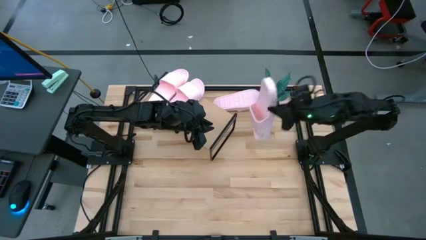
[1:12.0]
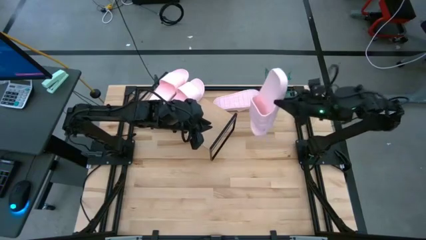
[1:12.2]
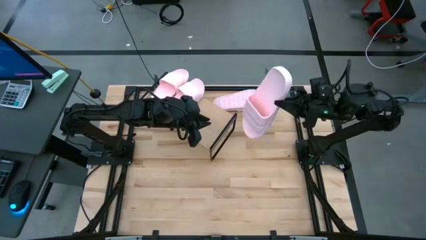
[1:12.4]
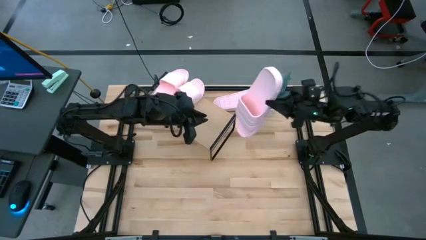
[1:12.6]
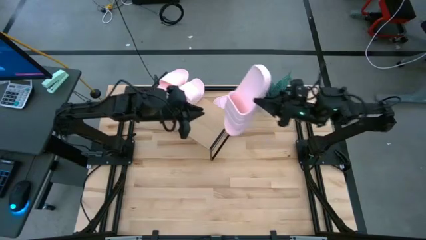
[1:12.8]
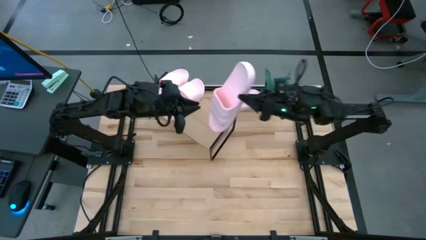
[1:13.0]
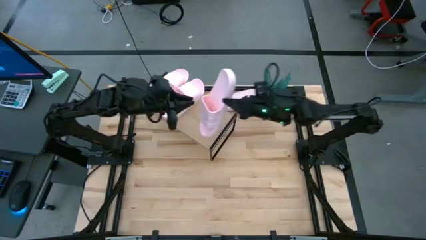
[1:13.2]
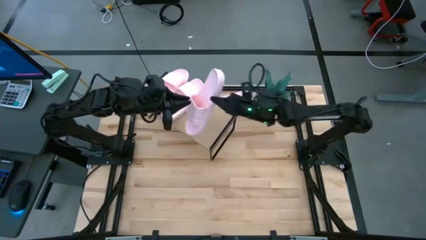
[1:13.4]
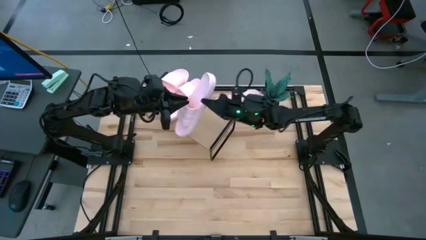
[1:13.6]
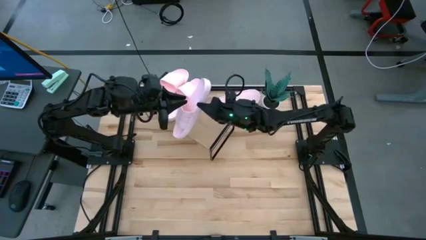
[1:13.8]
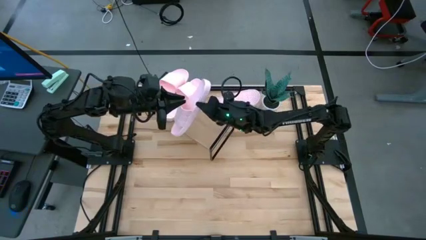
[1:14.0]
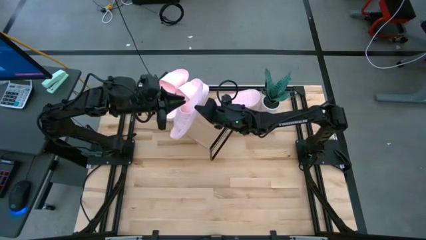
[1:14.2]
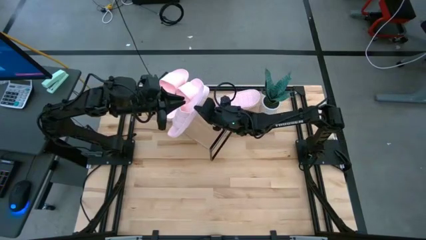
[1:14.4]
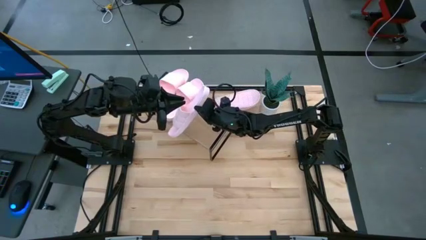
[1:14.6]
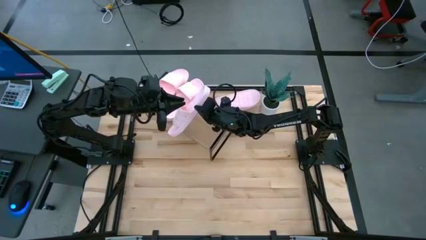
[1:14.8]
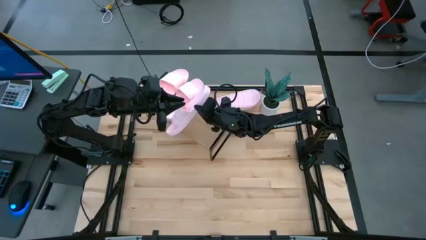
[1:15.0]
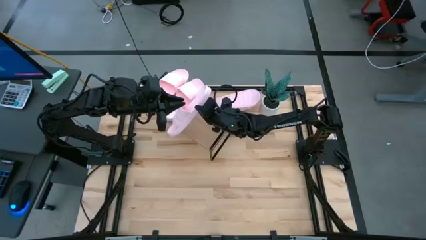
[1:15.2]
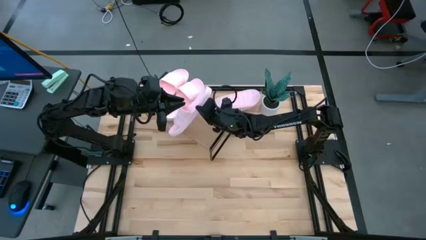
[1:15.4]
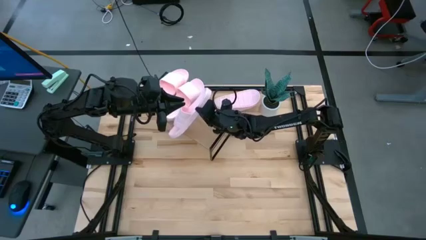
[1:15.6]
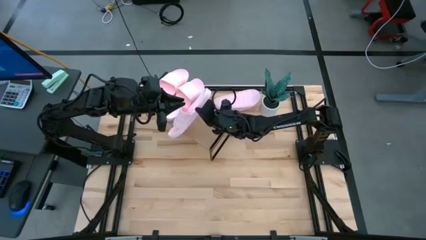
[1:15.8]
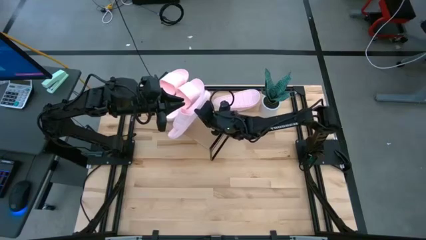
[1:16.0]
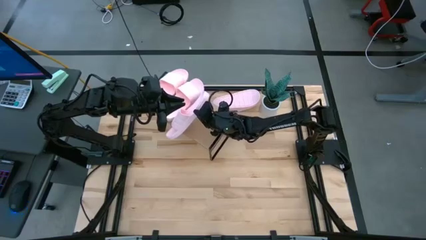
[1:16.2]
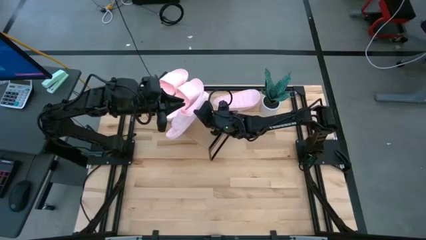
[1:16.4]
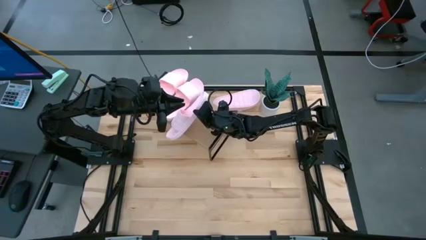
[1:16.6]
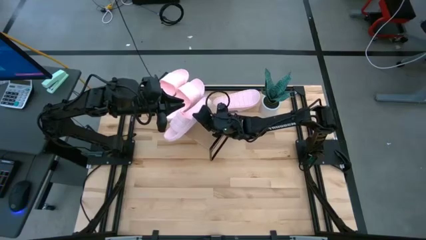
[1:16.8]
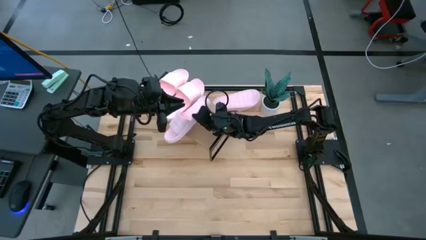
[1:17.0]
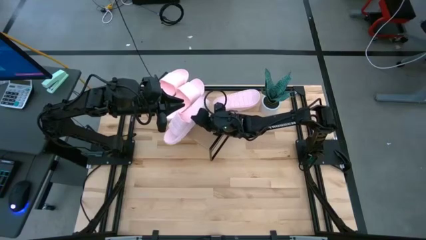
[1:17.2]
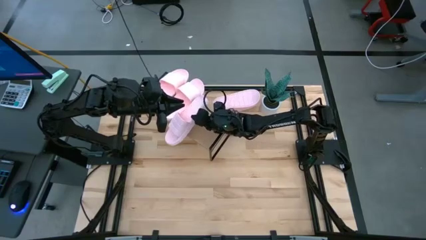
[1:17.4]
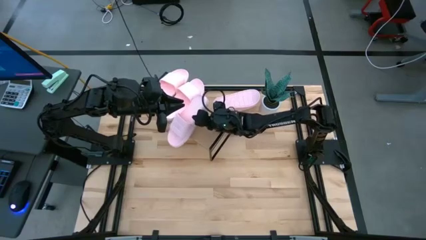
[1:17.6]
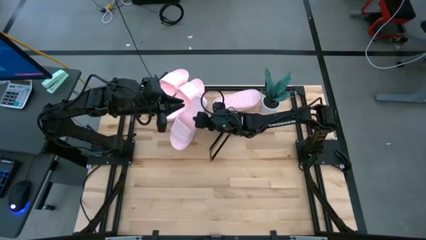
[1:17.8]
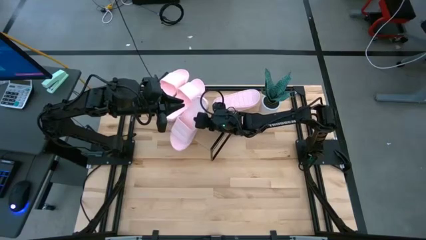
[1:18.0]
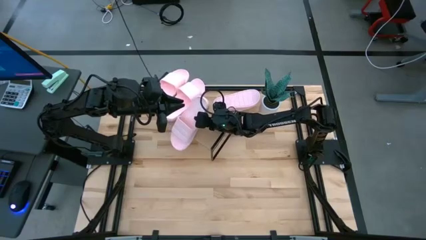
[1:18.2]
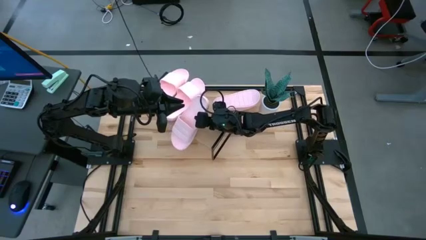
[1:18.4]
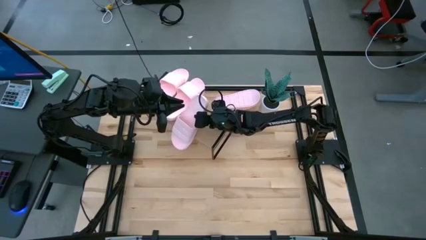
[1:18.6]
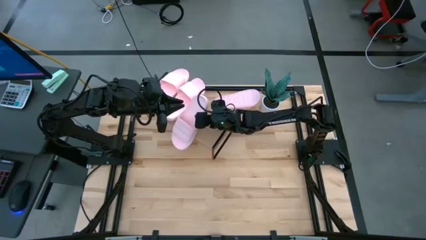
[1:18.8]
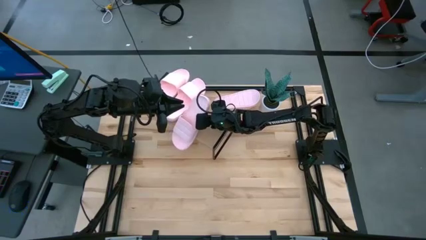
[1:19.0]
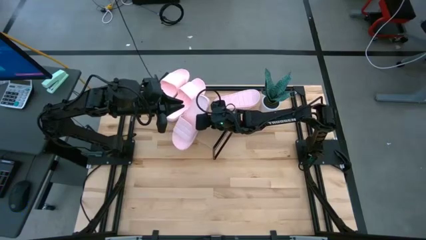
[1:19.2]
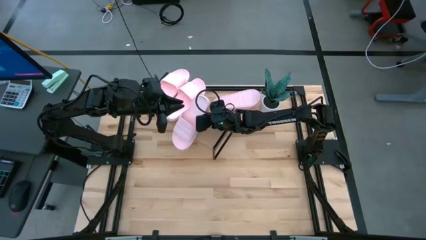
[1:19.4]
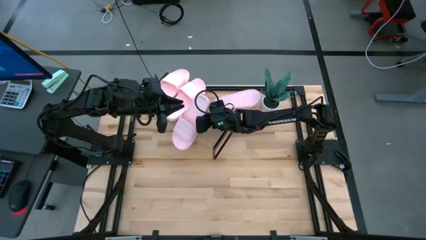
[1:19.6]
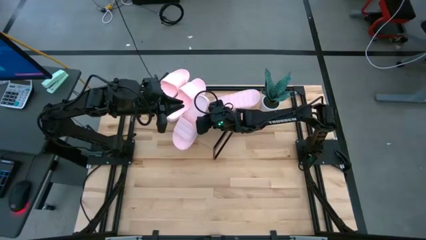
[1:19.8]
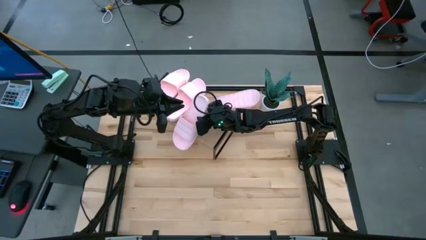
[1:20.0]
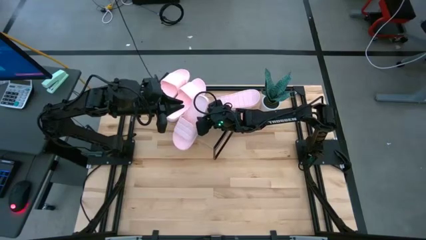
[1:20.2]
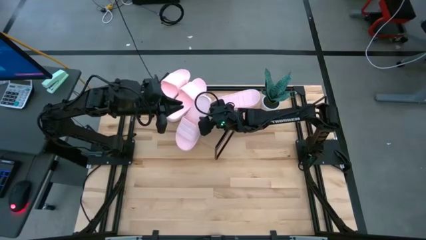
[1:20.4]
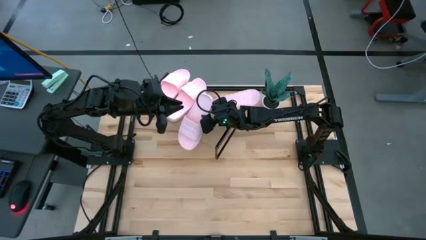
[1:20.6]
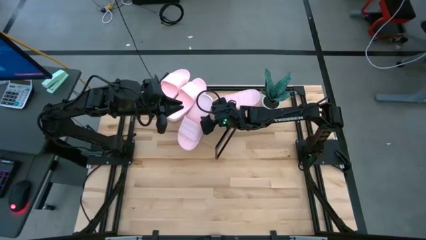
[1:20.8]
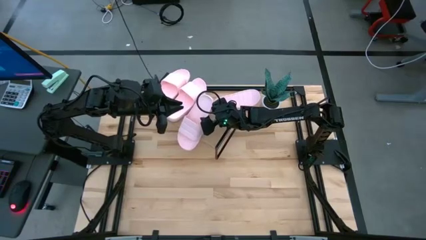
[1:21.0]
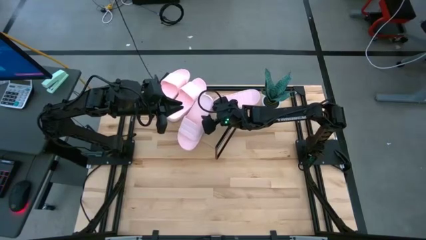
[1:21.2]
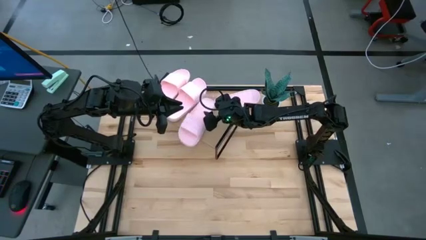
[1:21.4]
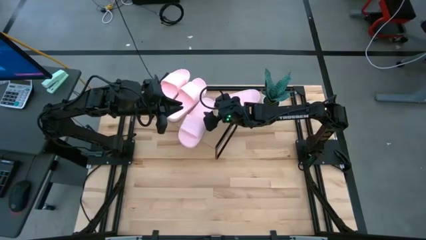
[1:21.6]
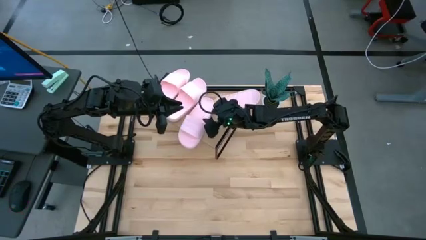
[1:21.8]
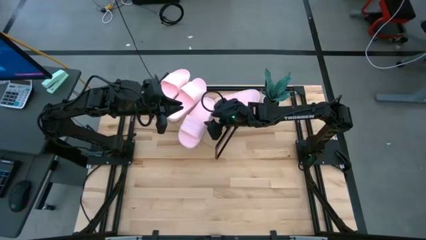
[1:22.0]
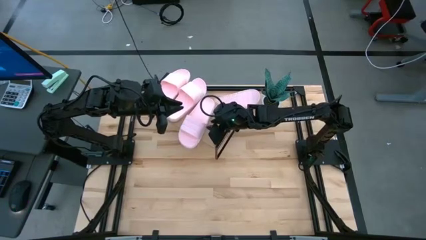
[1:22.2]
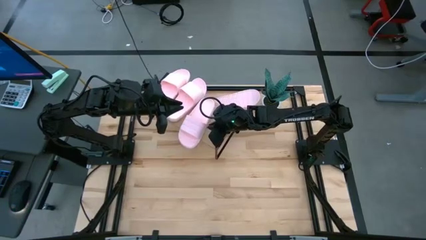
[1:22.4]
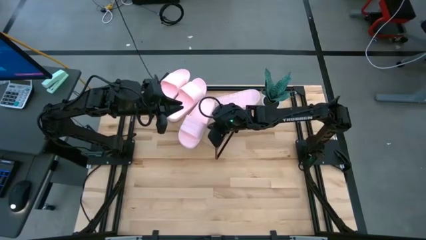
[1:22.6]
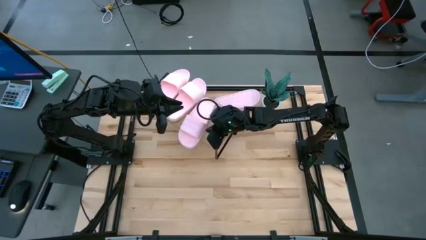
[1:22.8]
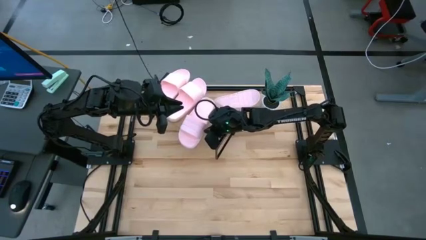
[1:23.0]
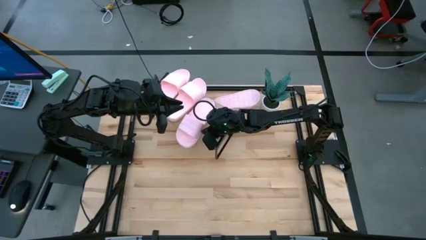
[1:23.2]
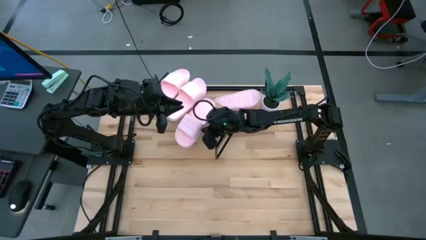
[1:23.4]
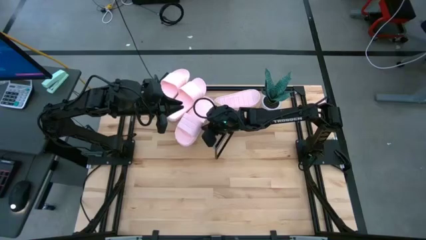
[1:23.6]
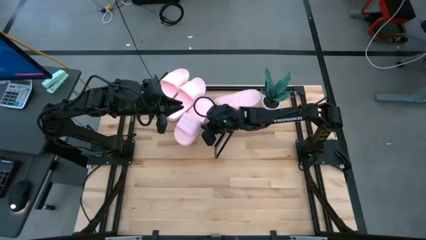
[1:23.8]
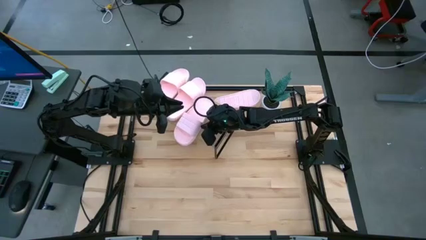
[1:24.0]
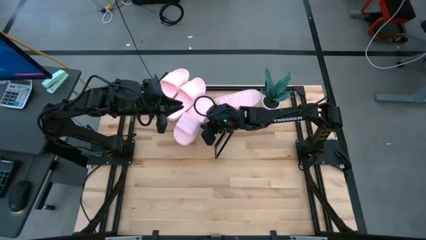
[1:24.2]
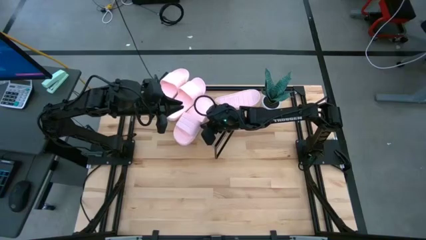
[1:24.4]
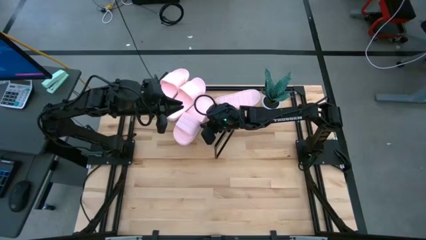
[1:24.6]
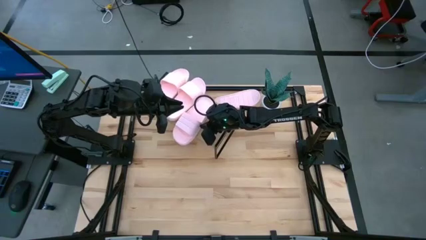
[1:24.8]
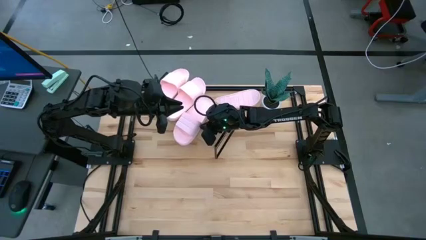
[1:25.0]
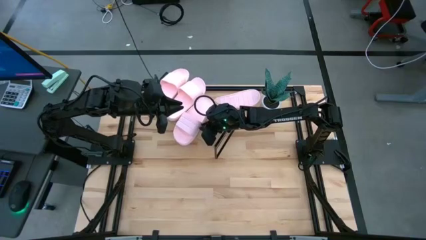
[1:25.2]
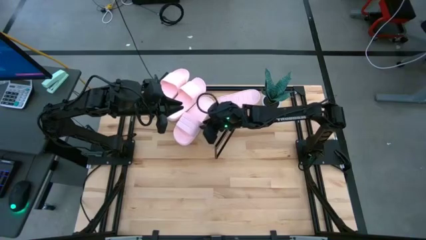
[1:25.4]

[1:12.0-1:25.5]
Task: Pick and place slides into the shelf
Put the pink slipper on the shelf
